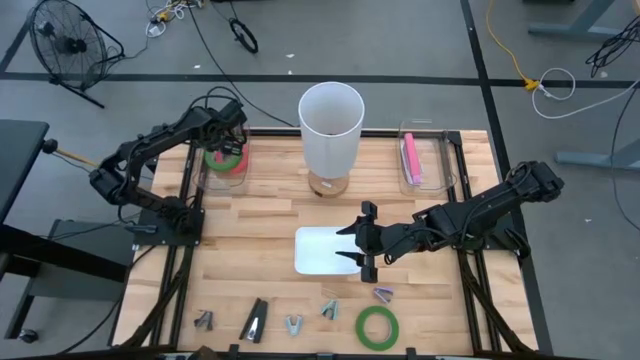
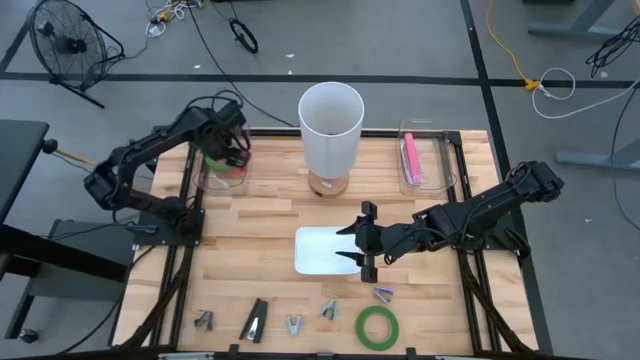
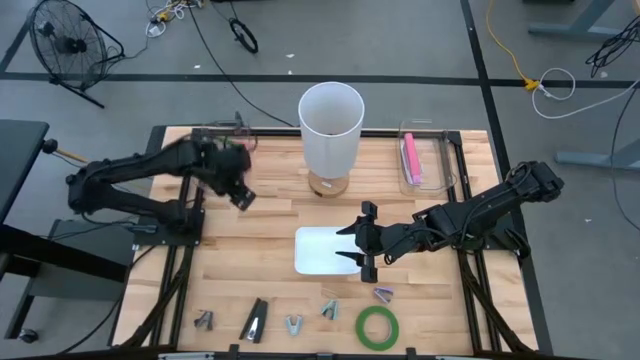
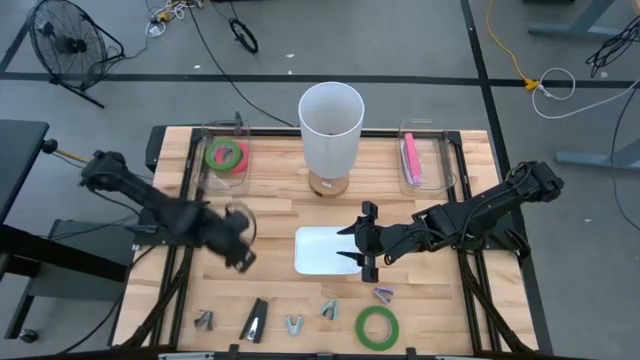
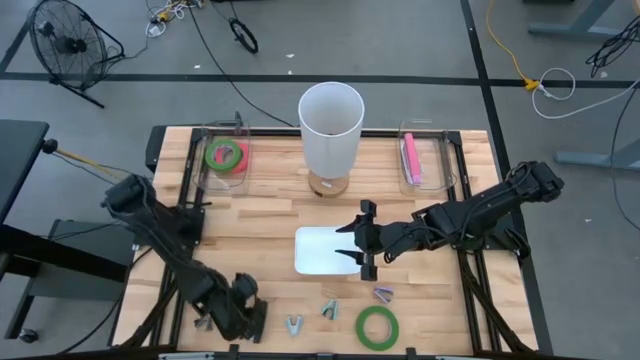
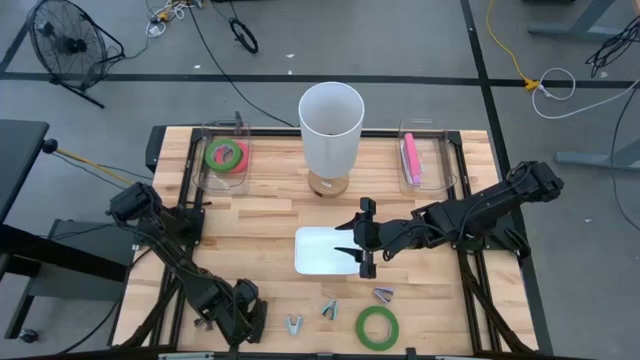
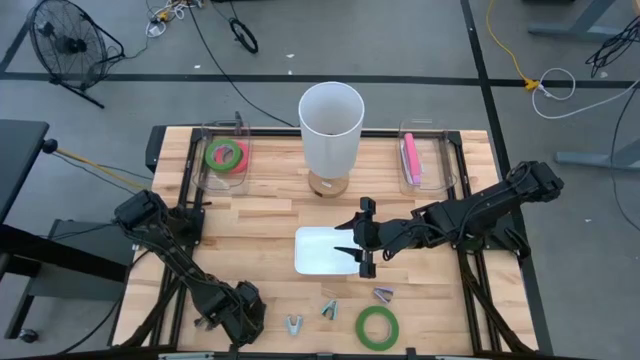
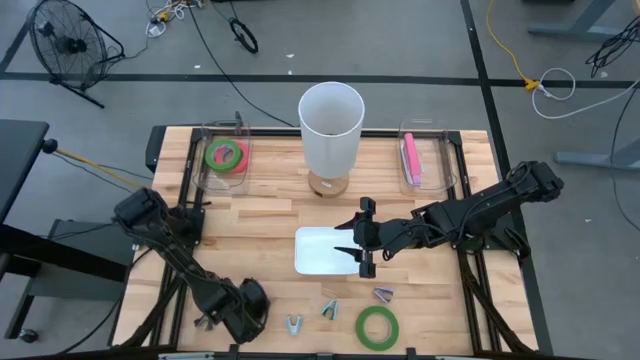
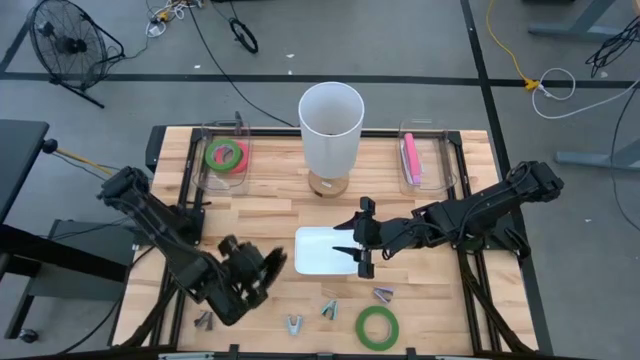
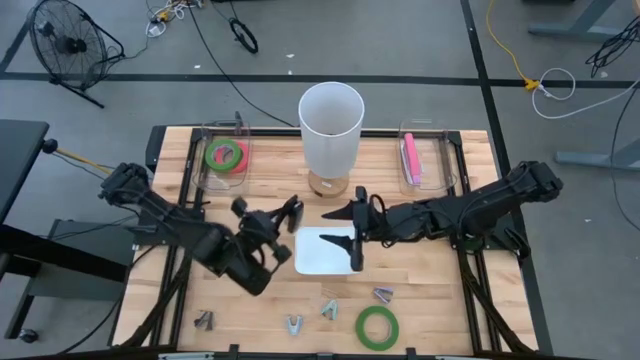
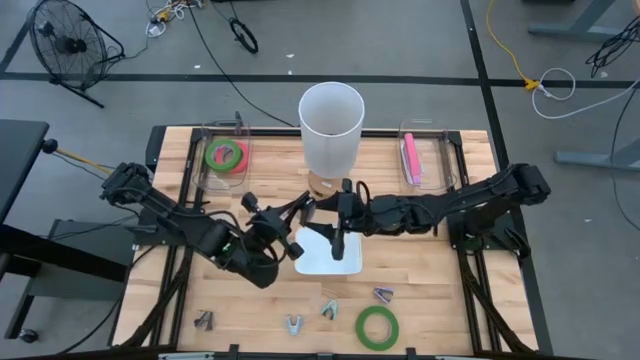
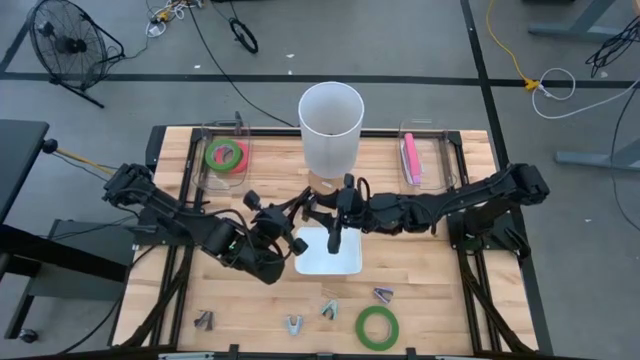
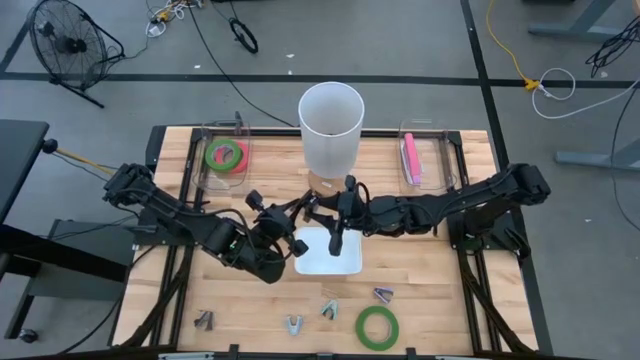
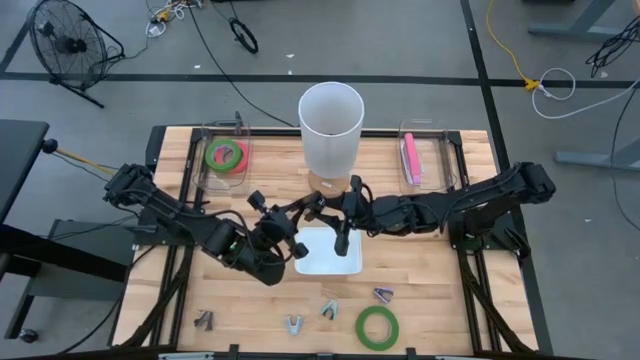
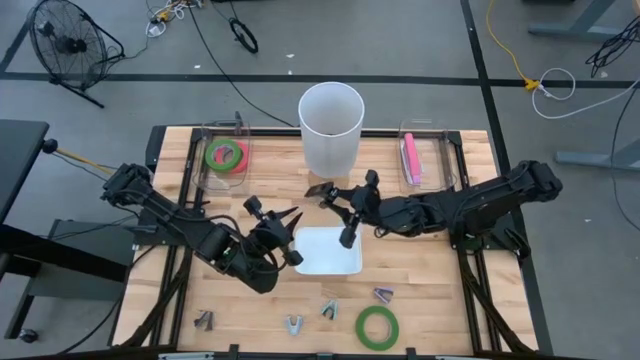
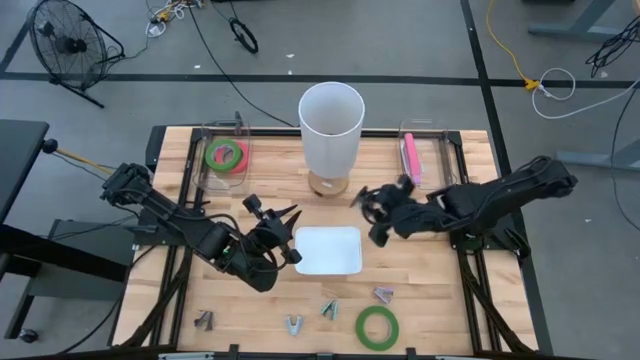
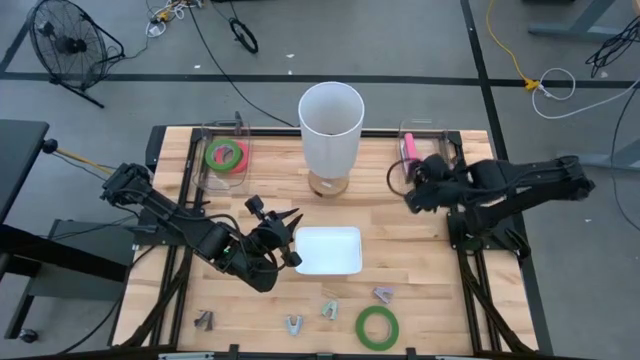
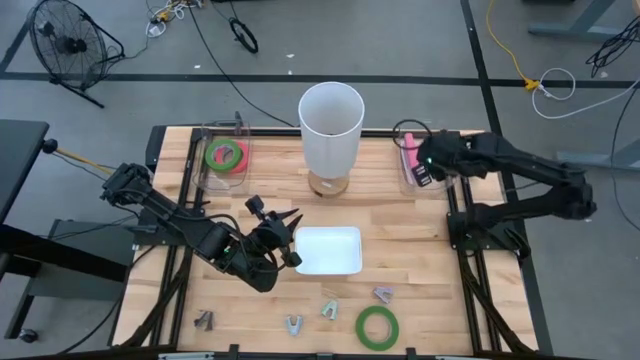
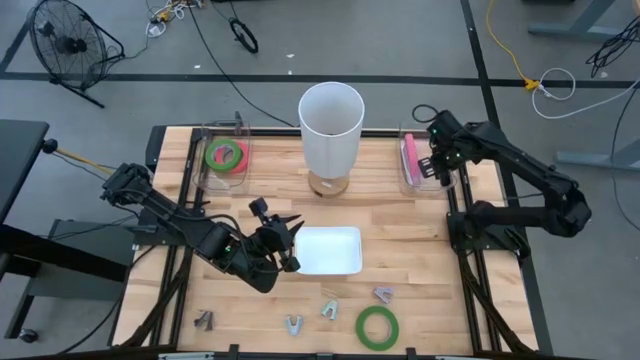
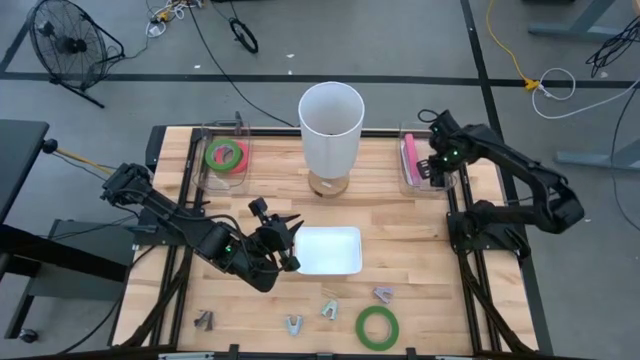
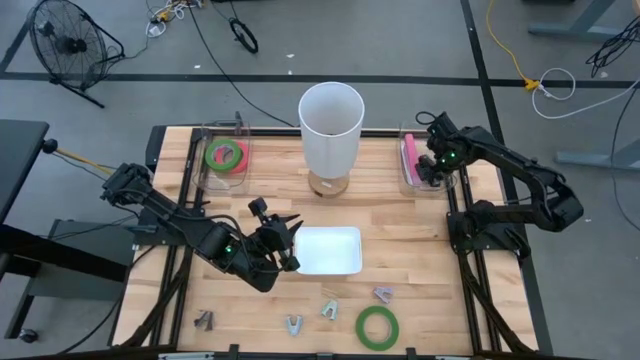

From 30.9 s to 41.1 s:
Task: Pick and place Stapler, Stapler remover, tape
Put the black stapler into the right transparent bin

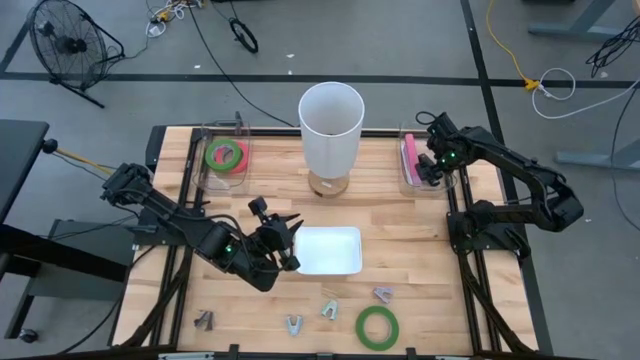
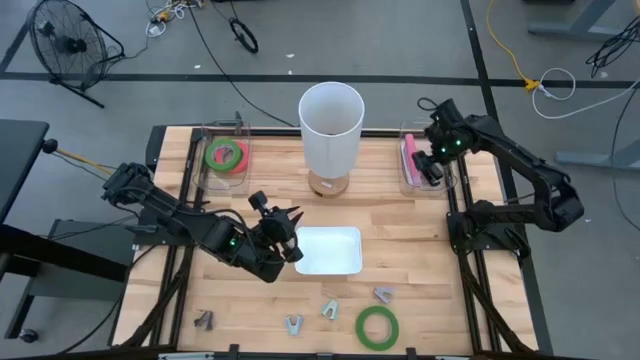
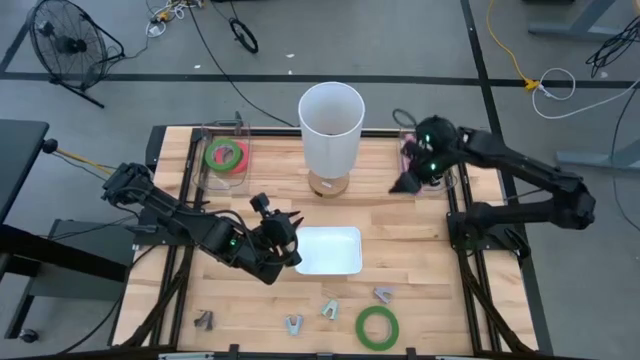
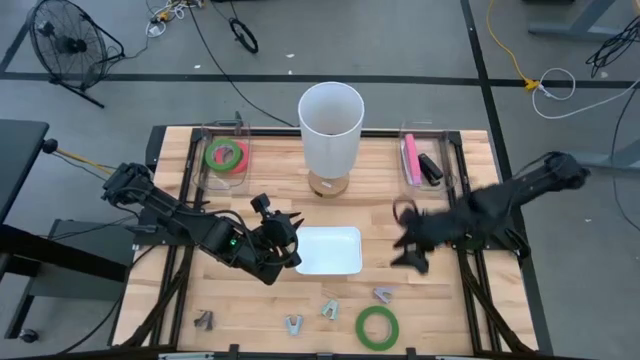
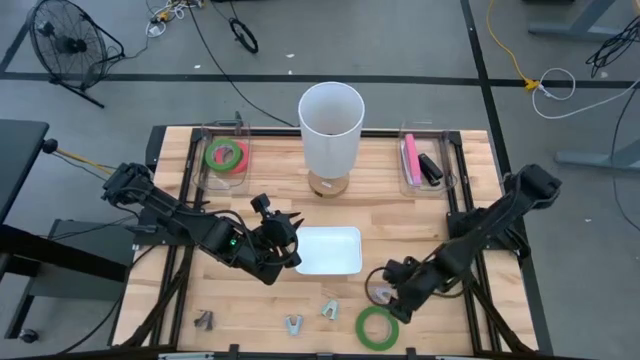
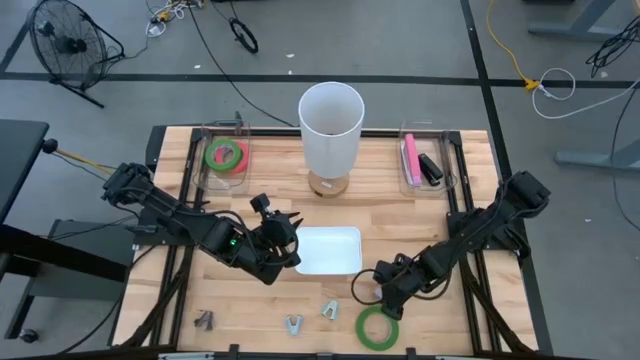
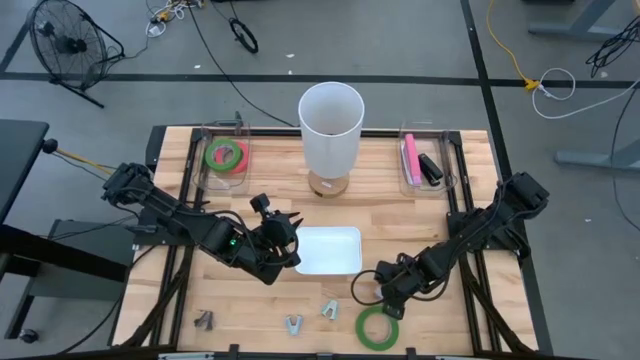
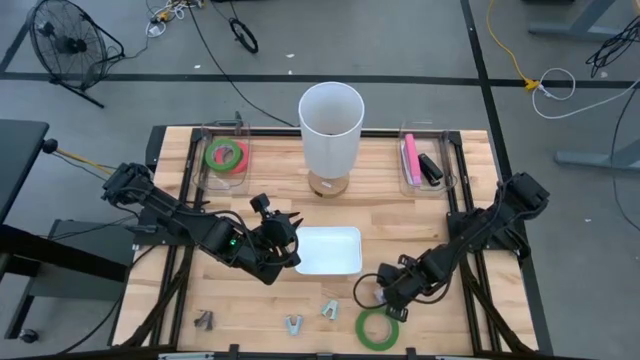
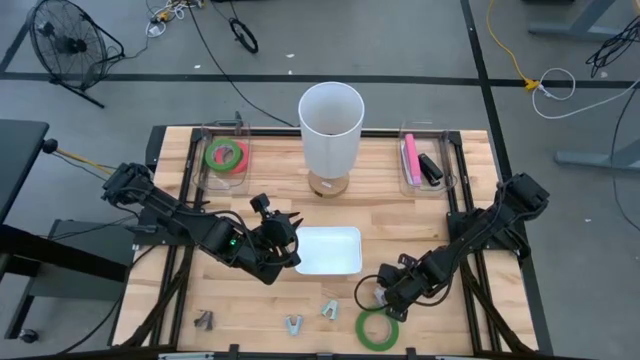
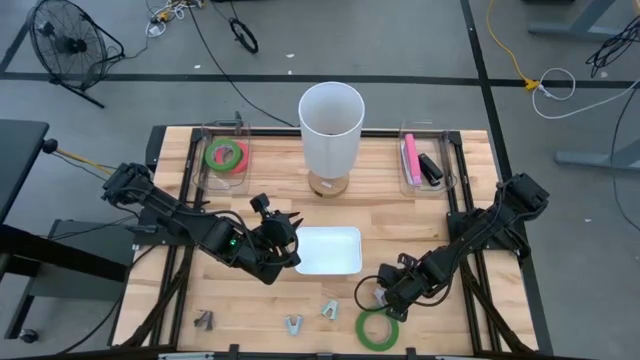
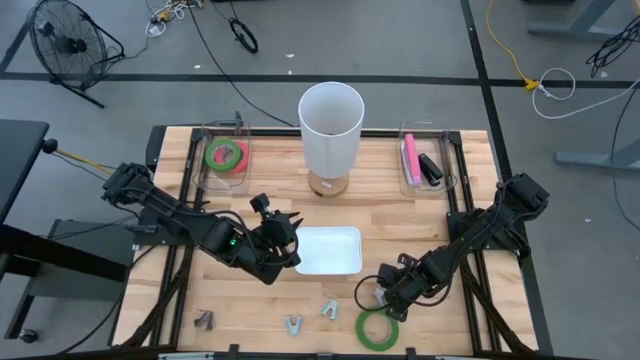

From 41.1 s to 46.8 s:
Put the purple stapler remover into the white bin

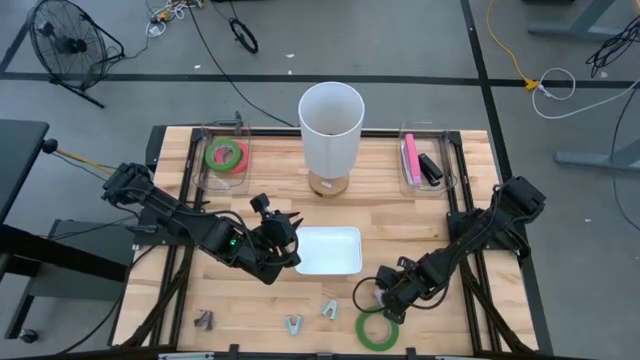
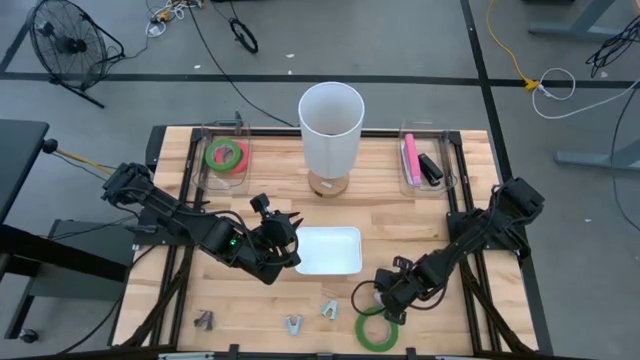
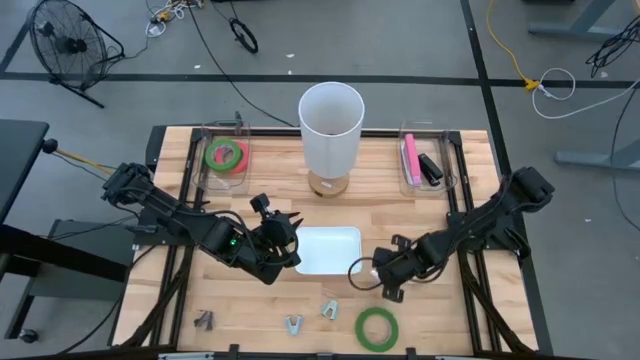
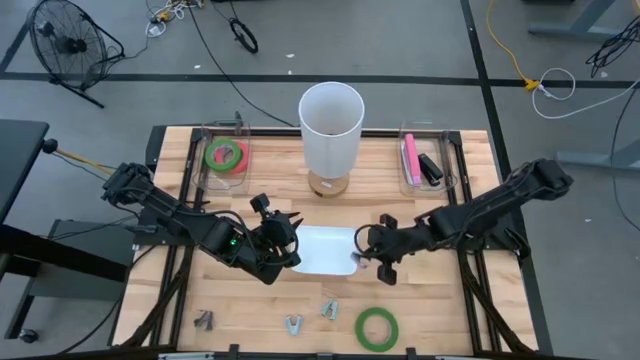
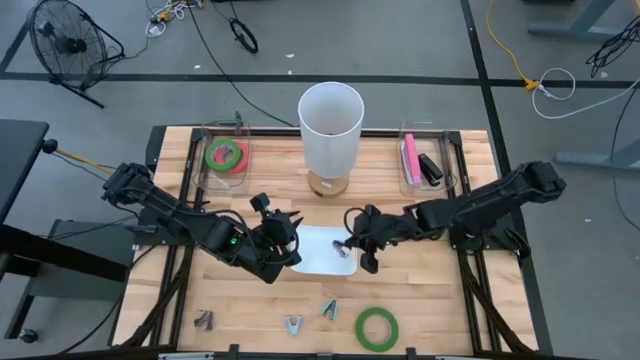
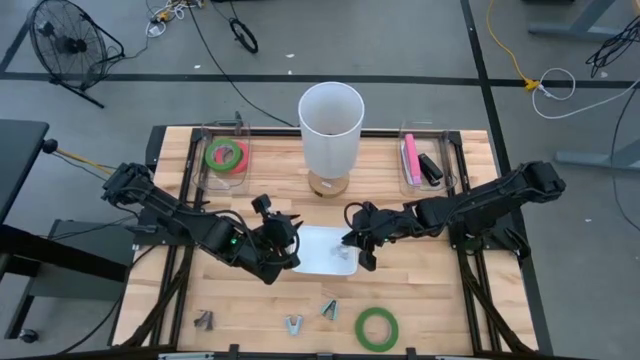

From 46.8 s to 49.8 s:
Put the purple stapler remover into the white bin

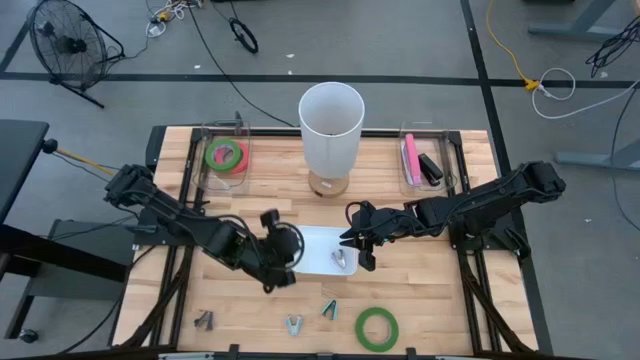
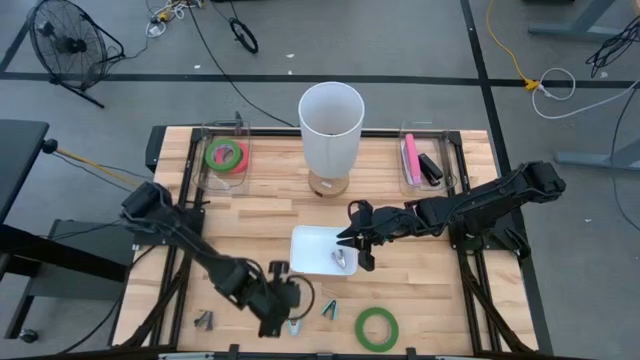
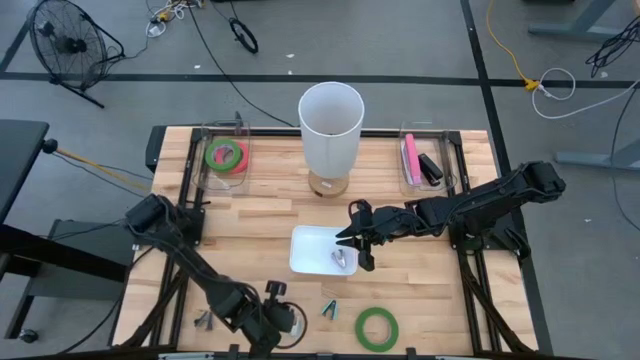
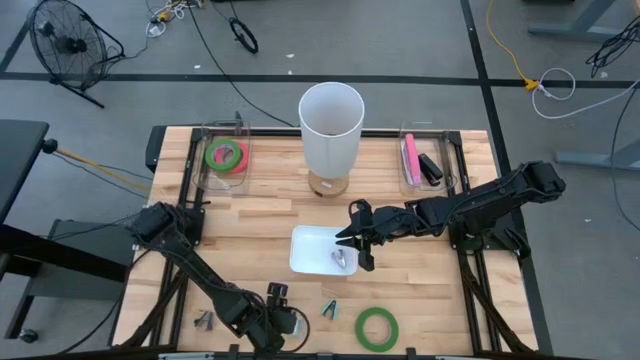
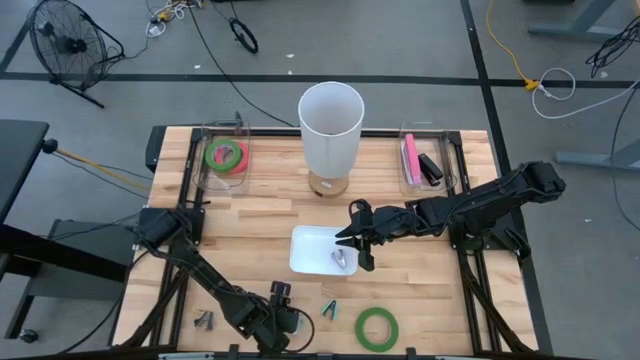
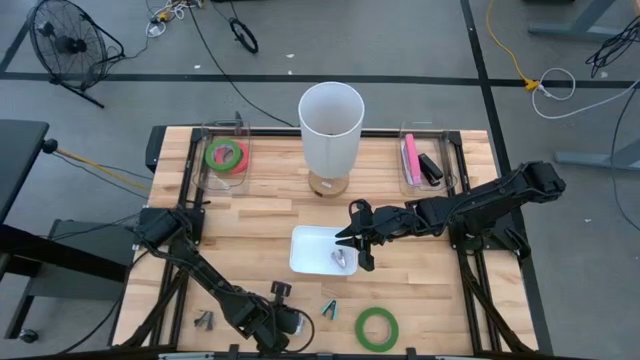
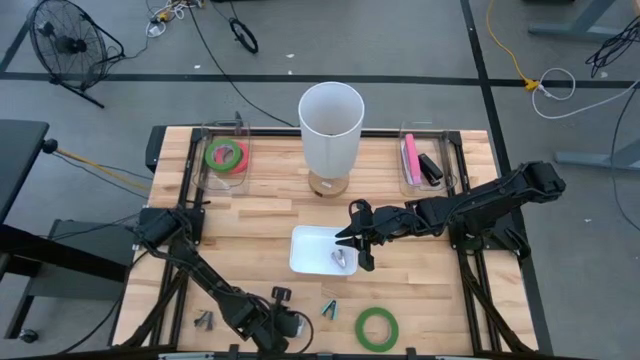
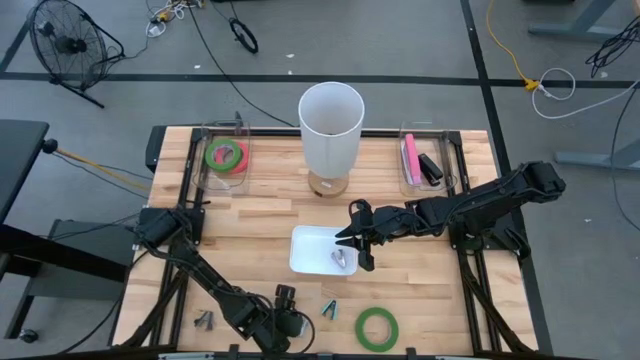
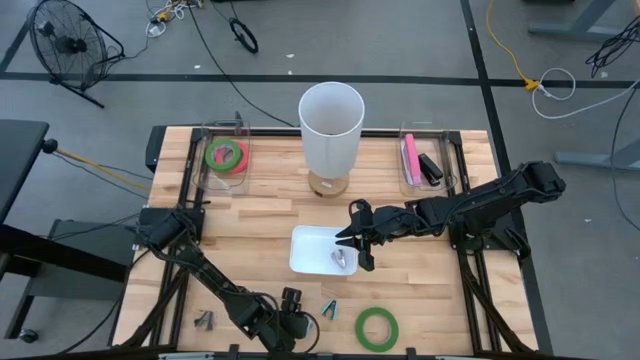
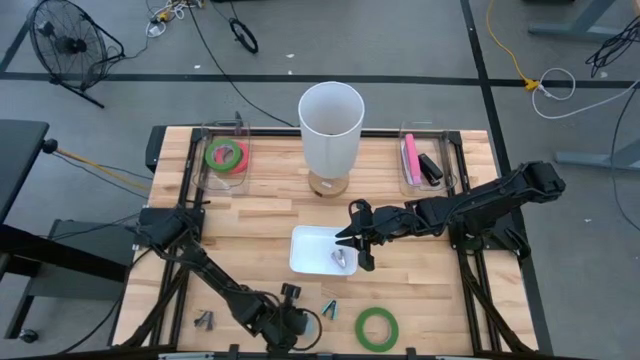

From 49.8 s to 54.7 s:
Put the bottom blue stapler remover into the white bin
